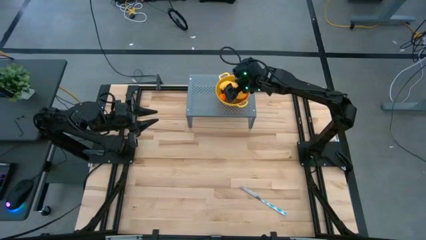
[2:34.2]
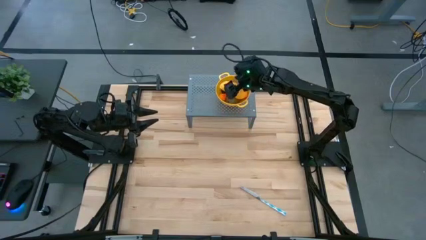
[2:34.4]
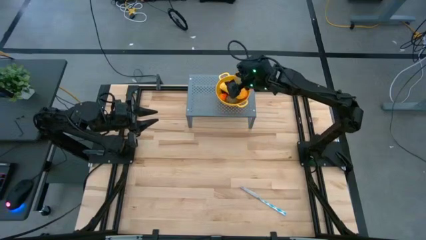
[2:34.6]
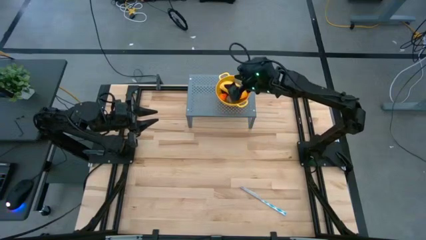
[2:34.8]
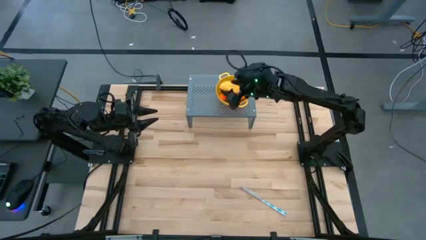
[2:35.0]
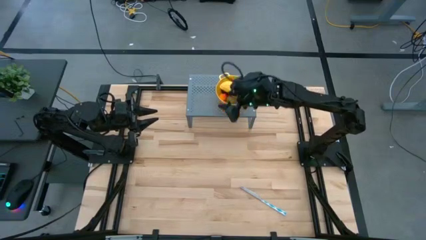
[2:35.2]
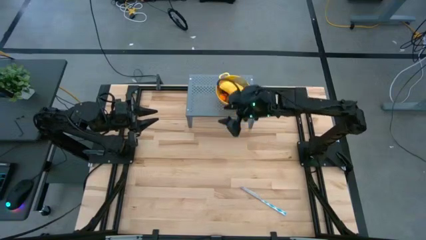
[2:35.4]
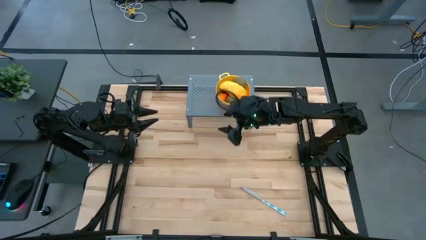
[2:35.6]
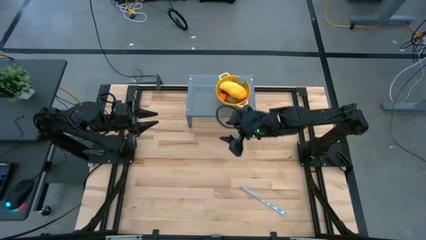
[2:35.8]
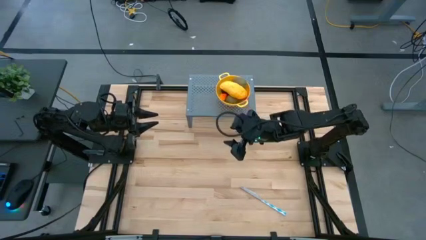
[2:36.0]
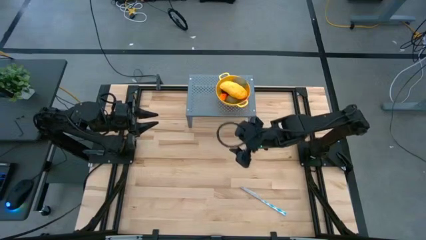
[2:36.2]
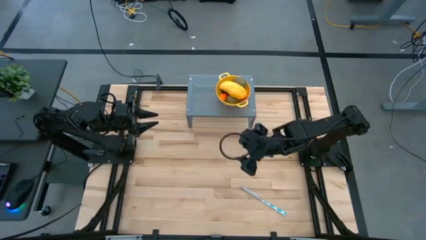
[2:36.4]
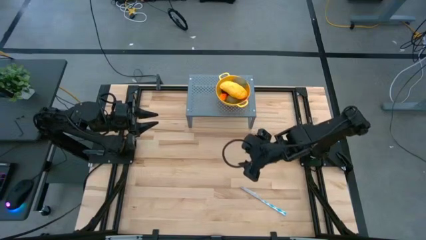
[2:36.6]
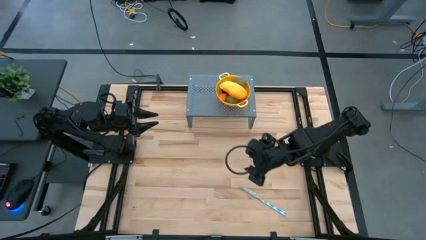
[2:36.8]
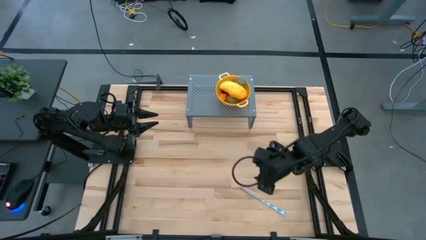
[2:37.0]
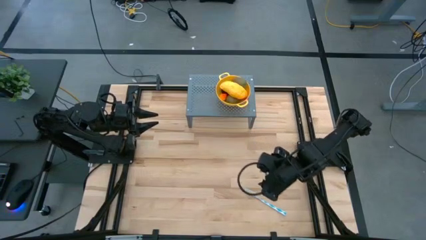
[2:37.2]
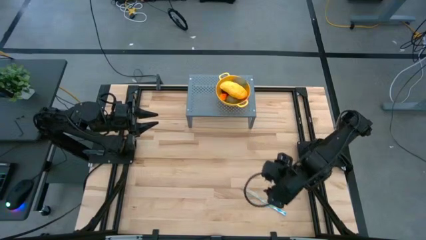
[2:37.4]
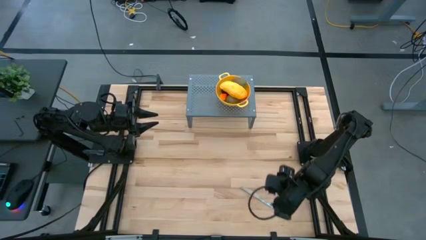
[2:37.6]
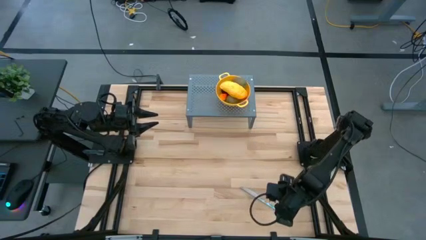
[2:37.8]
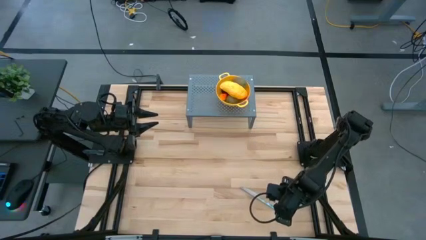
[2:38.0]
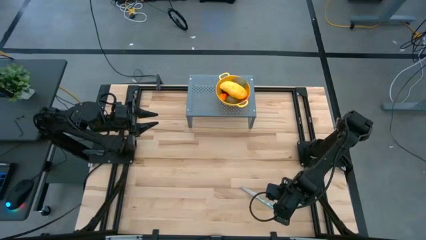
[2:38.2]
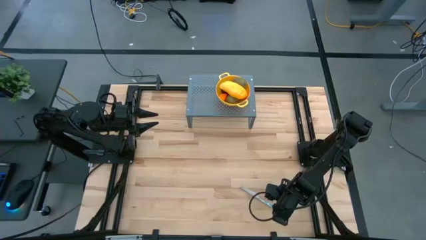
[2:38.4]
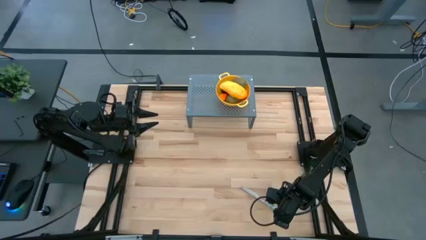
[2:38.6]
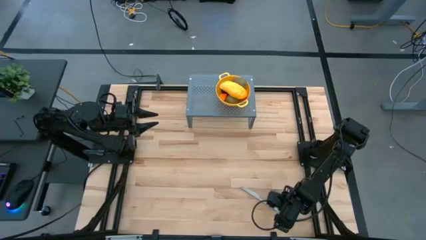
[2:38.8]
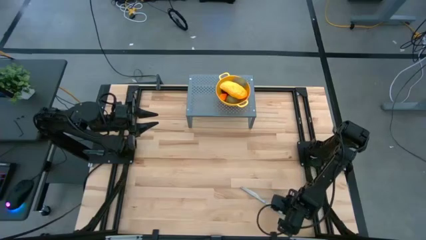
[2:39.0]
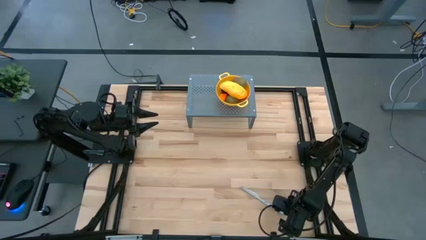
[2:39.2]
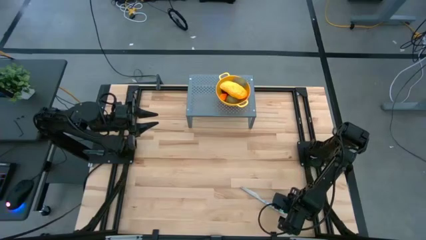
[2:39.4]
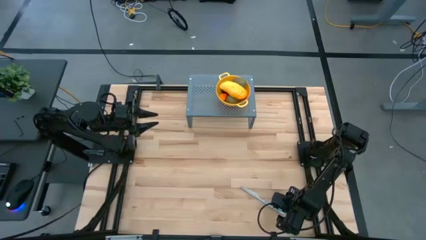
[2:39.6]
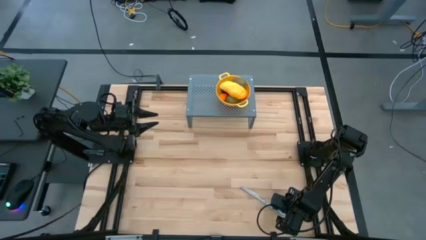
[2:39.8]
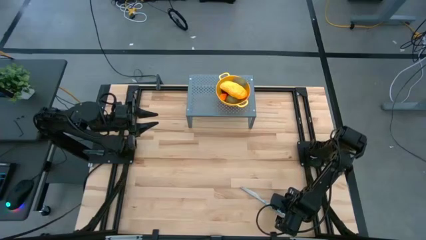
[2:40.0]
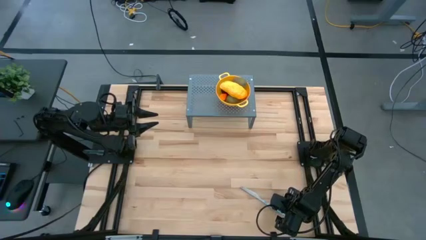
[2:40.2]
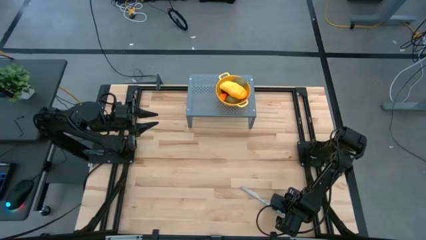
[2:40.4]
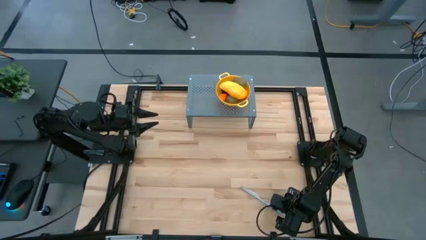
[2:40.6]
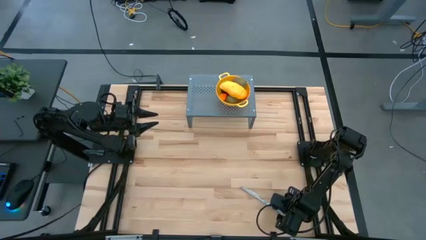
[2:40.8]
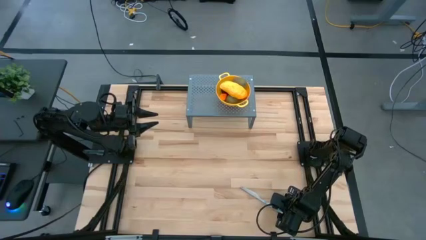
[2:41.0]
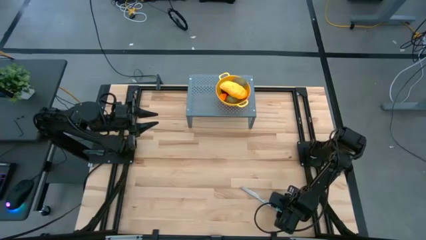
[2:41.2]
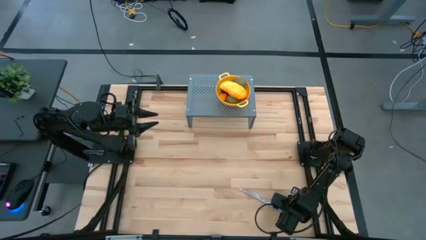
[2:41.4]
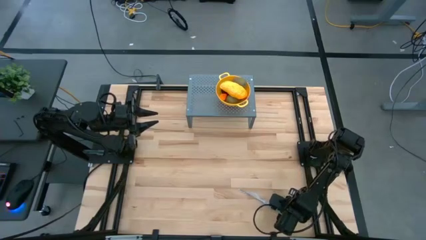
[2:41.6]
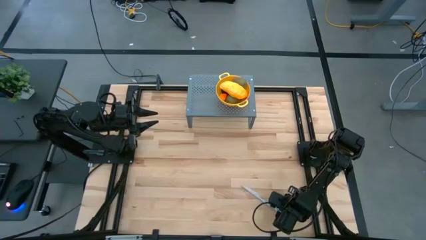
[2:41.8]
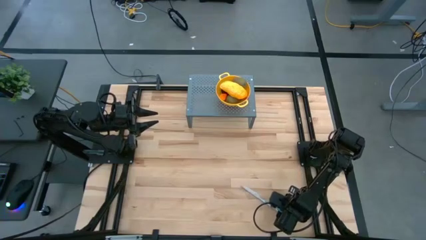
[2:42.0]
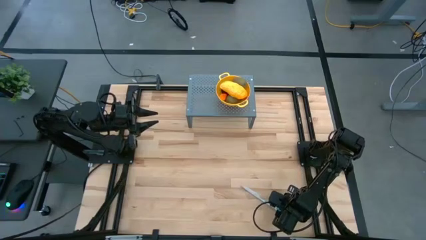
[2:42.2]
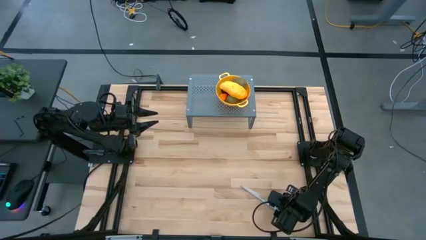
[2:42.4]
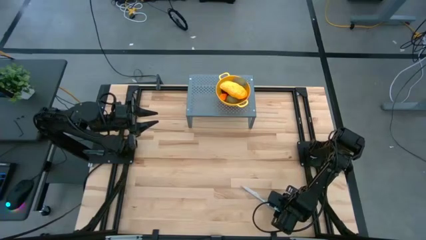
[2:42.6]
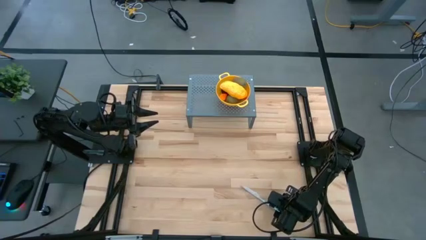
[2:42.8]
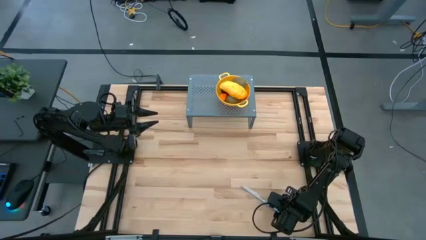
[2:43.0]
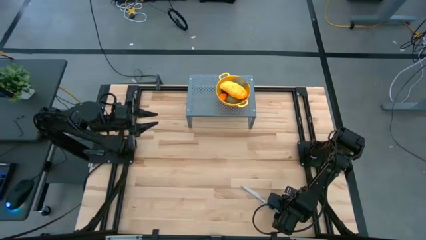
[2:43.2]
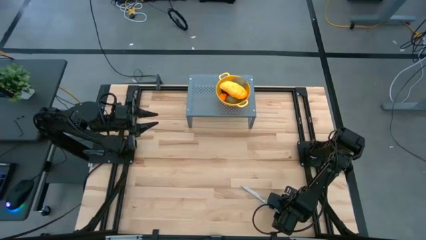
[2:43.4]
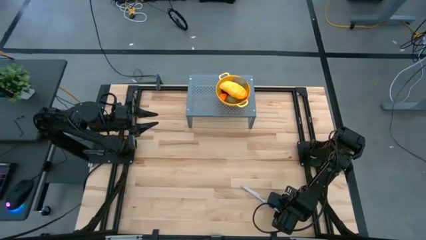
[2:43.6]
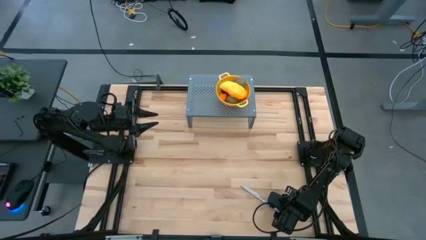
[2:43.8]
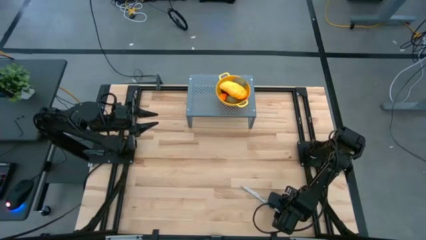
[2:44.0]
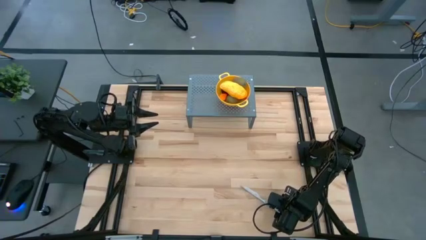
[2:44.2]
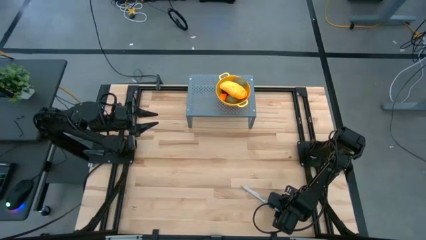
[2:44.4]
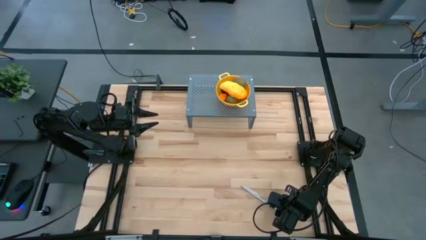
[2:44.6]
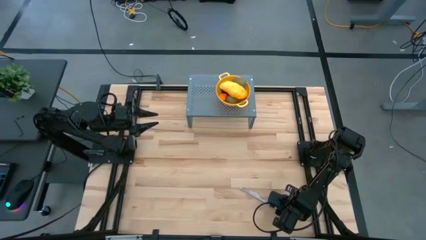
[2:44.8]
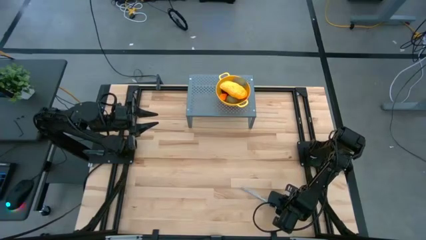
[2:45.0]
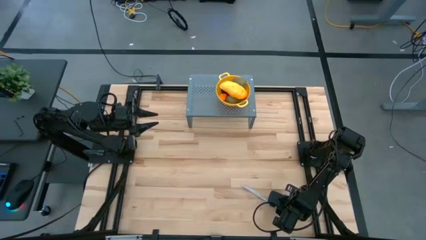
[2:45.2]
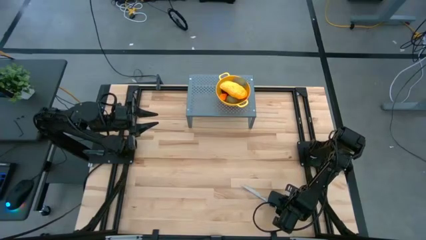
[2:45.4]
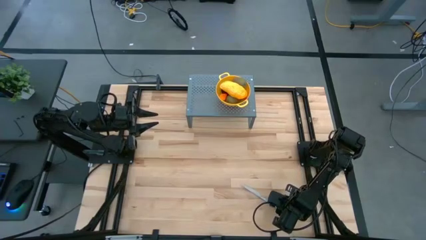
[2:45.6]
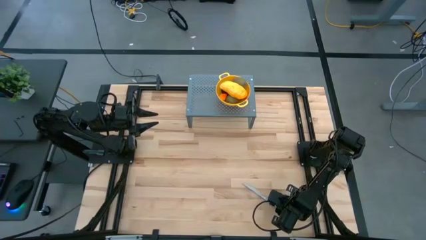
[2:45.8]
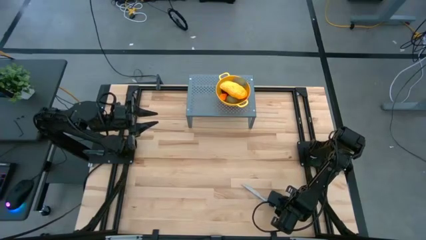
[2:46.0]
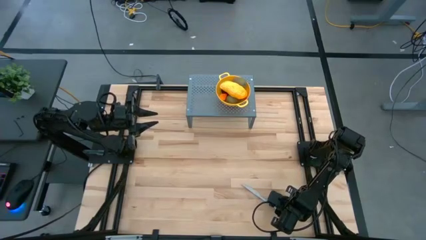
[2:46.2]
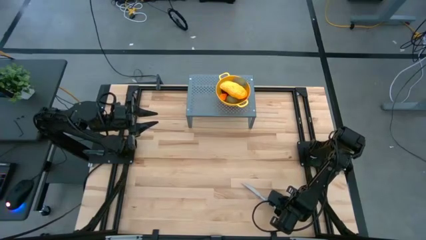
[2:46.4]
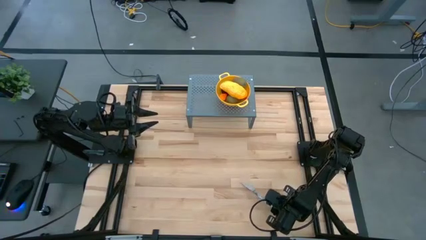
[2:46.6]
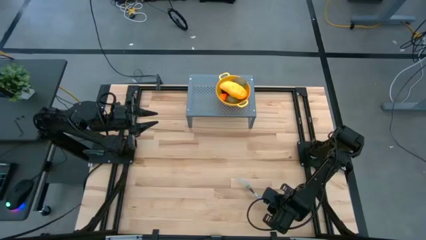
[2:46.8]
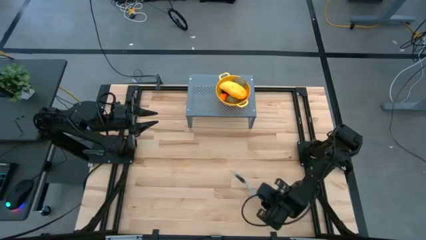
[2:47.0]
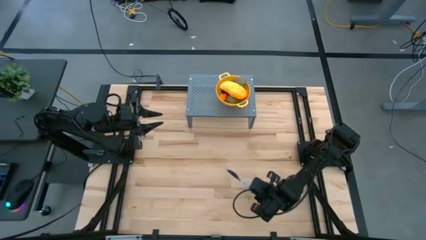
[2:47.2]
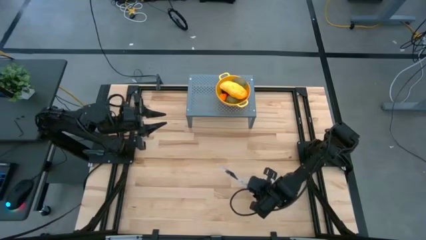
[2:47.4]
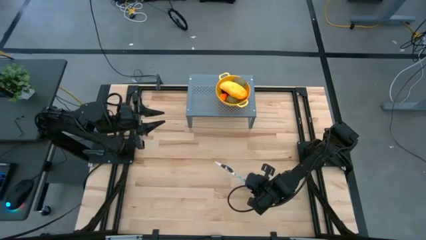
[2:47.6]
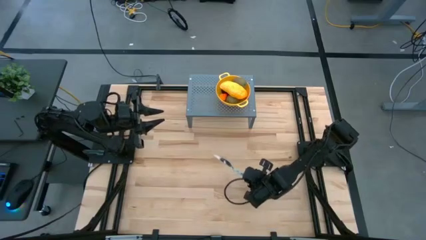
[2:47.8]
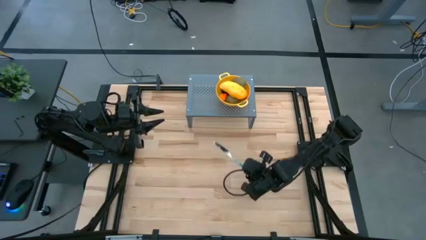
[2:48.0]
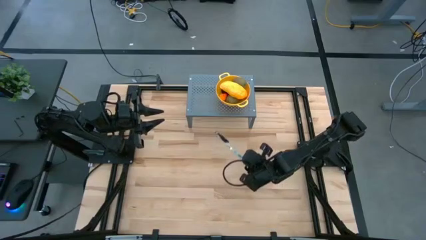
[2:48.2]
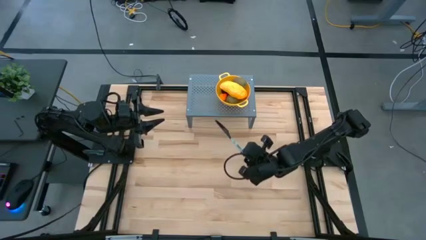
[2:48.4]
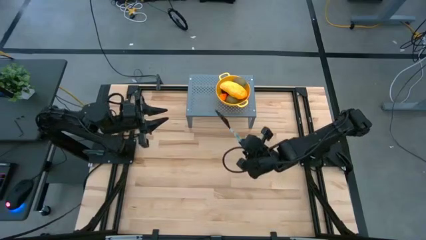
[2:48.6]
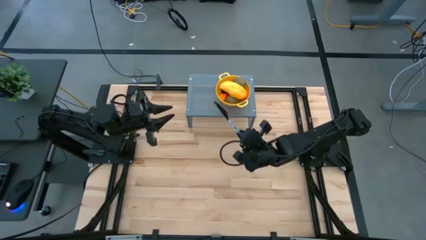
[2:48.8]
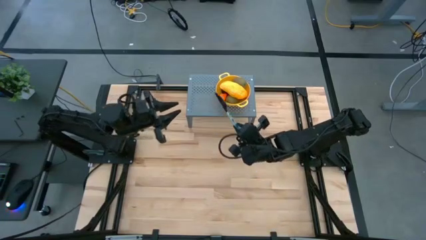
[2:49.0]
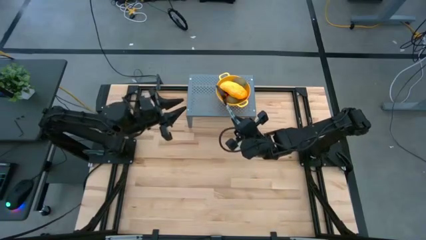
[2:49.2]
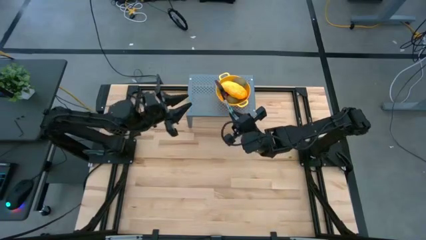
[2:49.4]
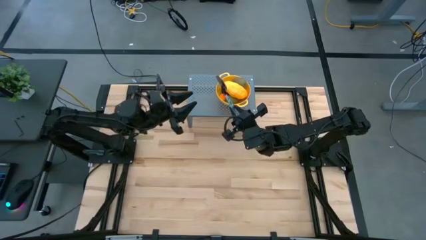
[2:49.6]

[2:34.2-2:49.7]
Task: Pick & Place Fruit
Put the blue patterned table knife on the shelf
